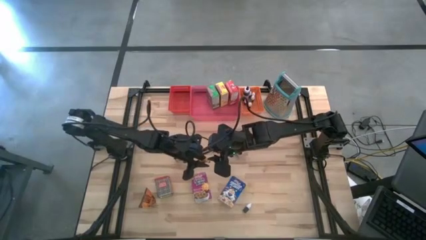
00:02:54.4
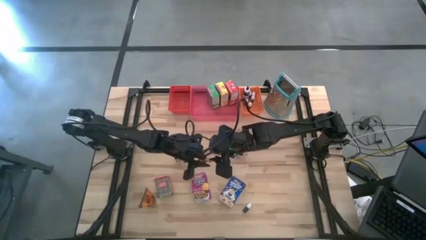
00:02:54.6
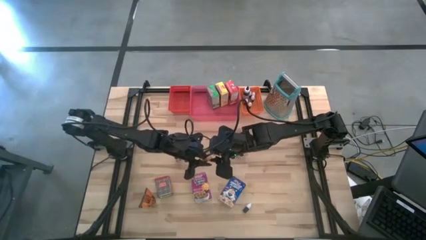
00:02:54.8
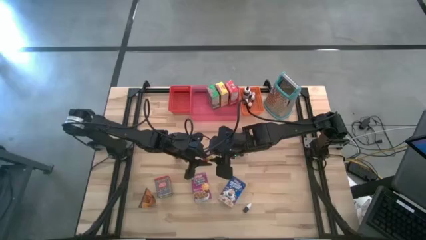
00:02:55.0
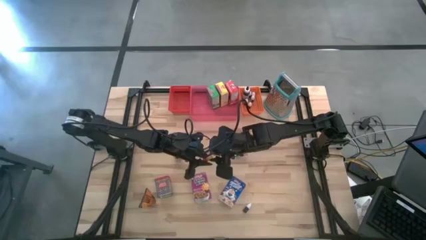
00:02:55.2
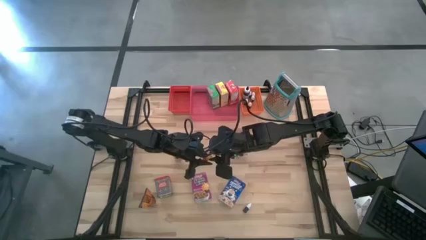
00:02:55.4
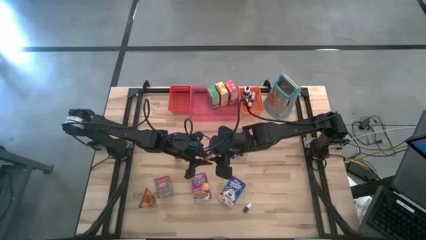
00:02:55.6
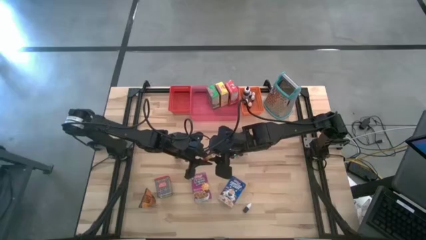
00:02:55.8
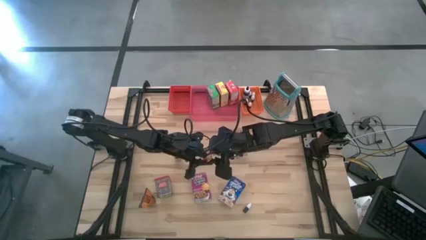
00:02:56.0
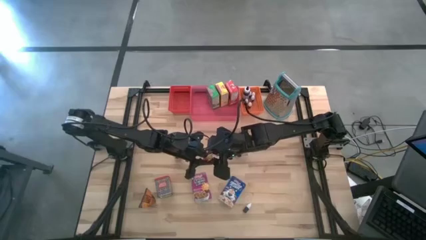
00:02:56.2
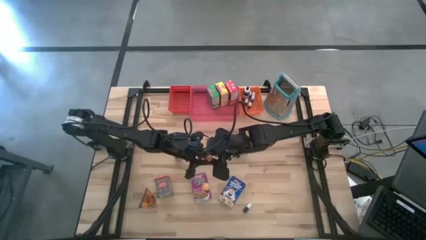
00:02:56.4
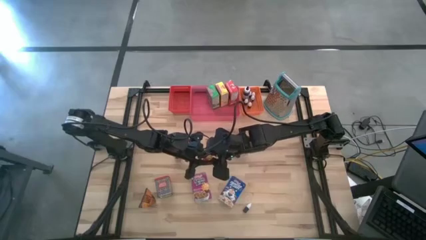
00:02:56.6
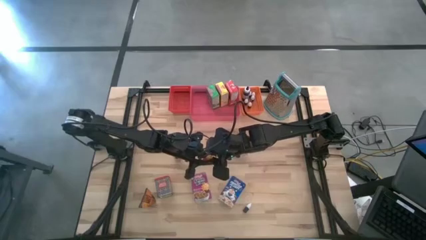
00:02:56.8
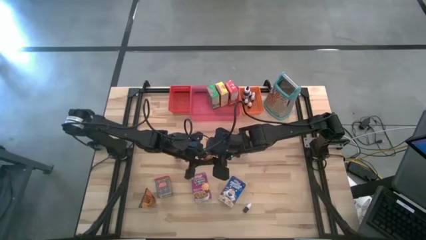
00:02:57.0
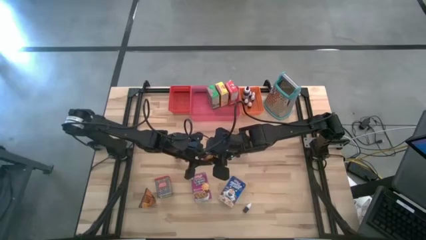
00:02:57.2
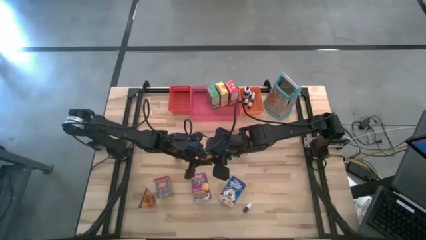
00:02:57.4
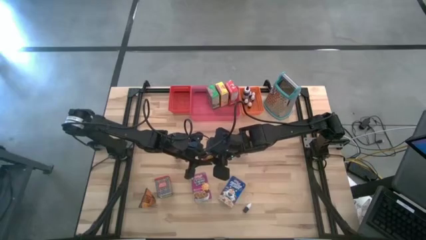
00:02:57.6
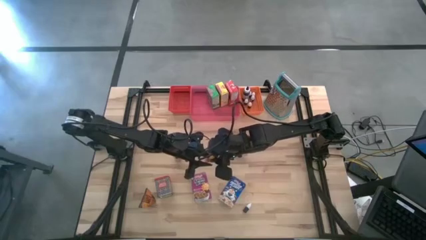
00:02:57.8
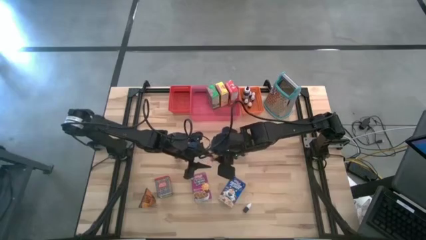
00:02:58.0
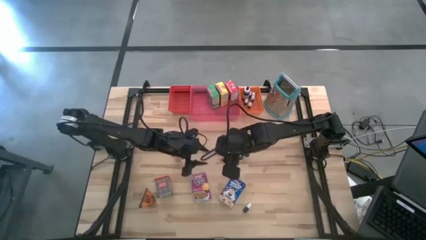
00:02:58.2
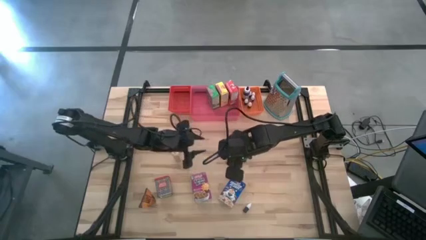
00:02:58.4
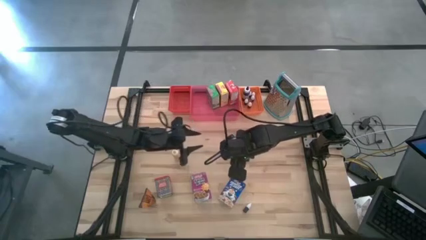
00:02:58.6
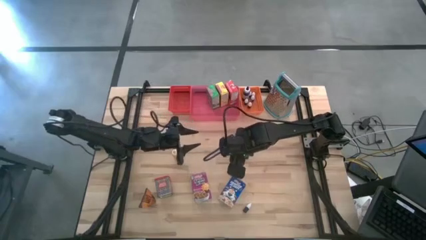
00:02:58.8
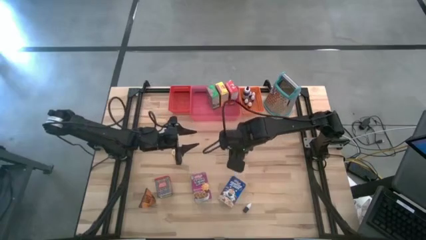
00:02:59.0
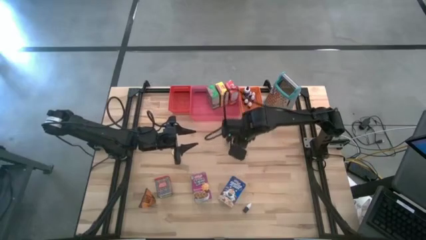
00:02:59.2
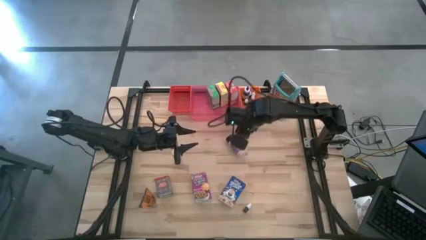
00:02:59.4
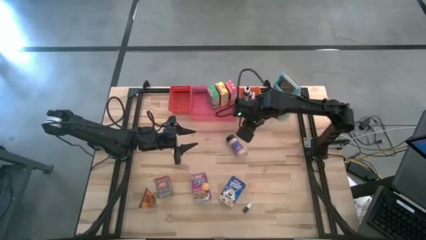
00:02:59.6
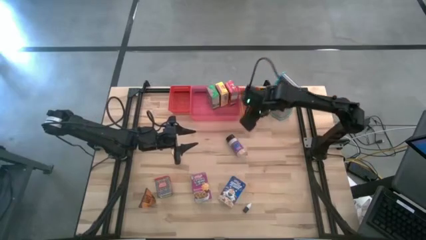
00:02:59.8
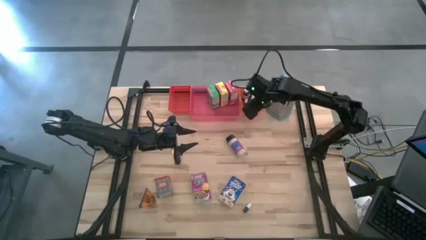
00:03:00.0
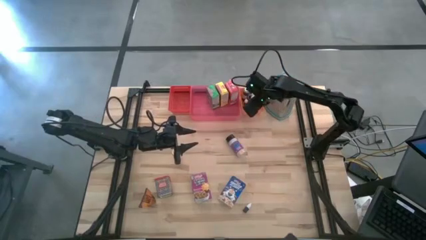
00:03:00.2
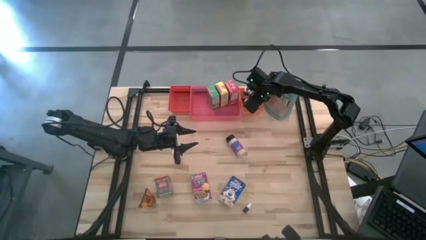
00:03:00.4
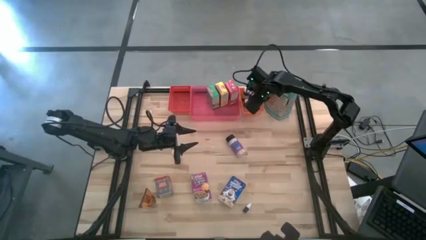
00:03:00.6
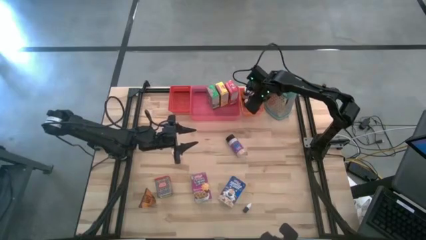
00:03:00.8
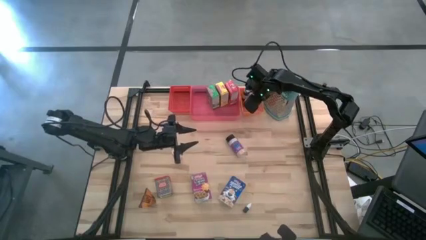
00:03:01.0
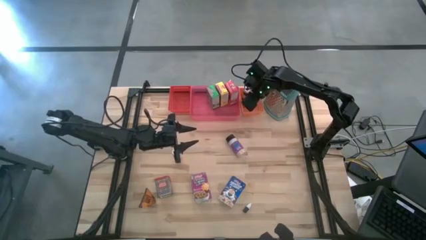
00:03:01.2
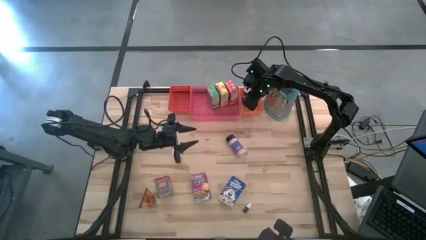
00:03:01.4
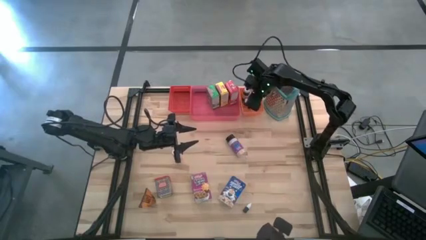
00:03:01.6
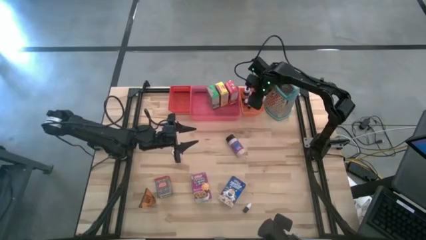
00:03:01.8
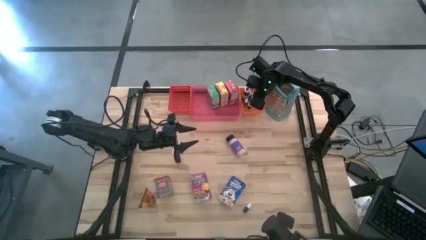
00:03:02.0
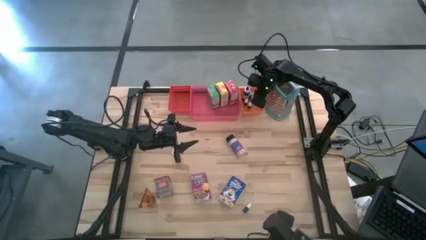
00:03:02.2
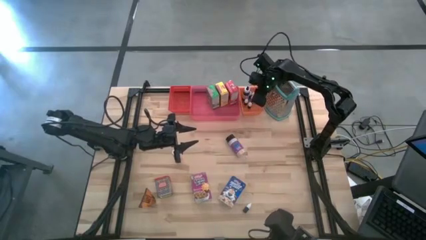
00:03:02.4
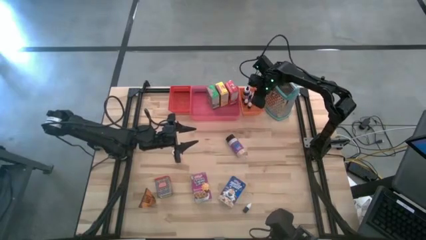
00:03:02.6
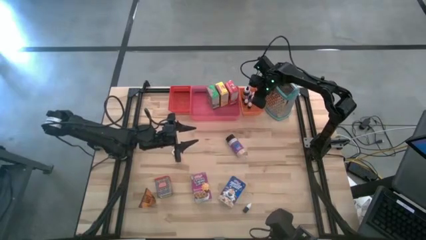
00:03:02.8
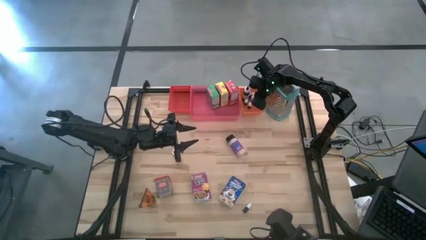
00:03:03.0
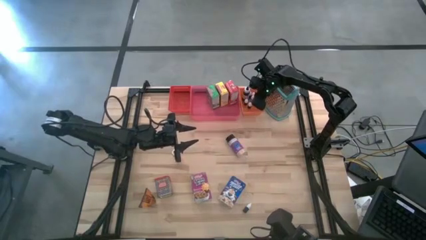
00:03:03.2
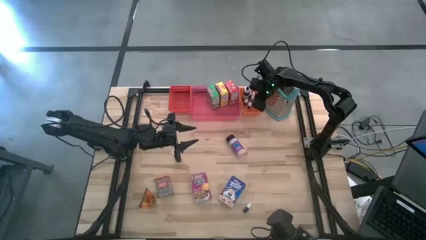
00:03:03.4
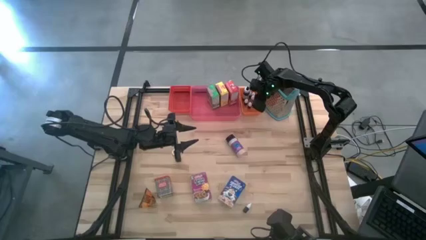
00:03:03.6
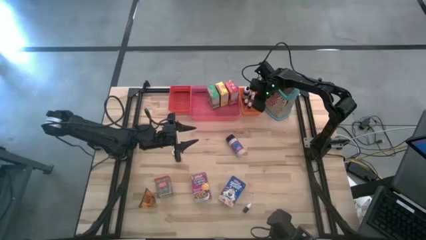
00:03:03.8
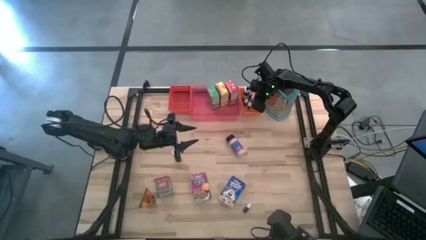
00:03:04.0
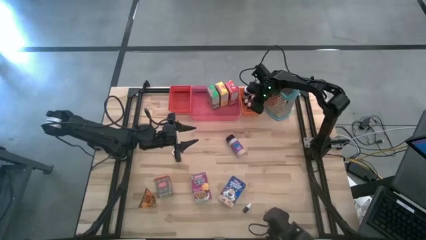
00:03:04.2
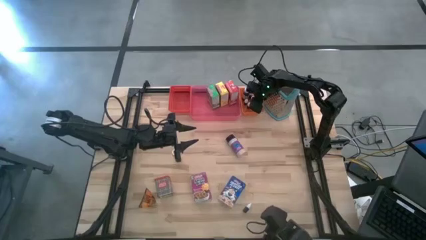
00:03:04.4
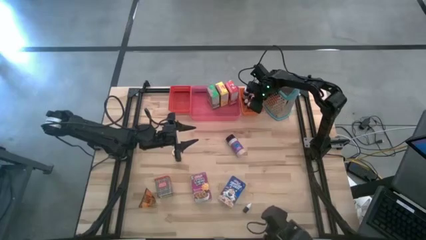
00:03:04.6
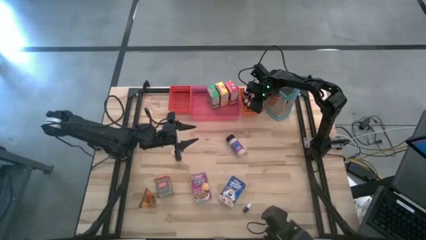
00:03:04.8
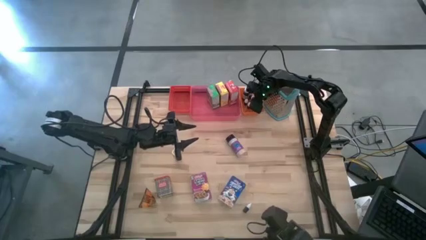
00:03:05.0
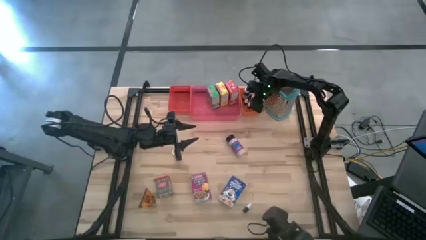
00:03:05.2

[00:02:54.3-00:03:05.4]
Task: Pick & Place Kitchen Items
Put the orange food coloring bottle into the orange bin
